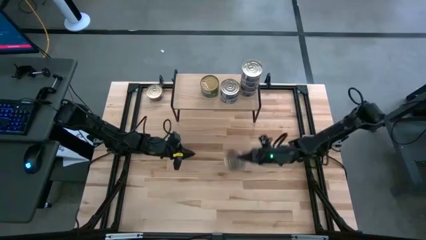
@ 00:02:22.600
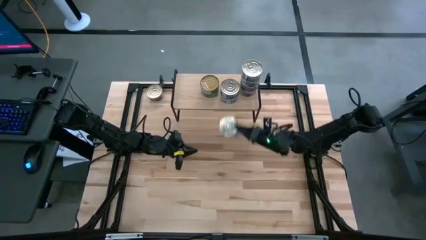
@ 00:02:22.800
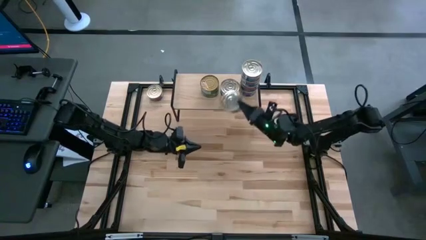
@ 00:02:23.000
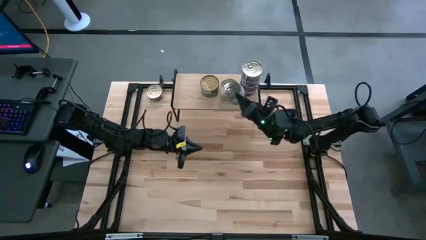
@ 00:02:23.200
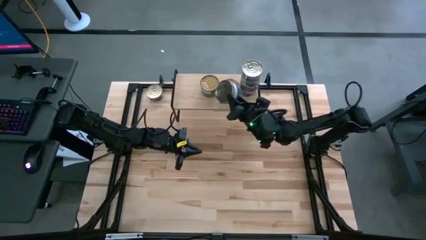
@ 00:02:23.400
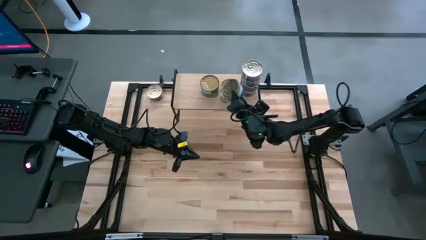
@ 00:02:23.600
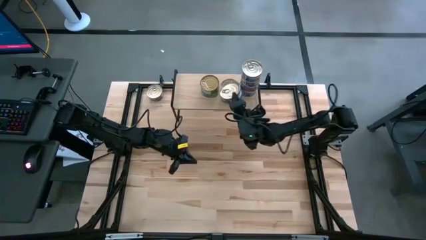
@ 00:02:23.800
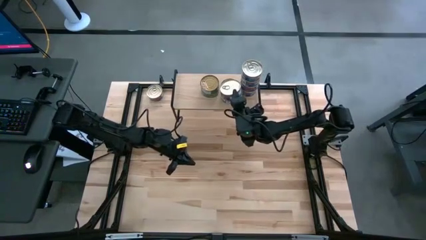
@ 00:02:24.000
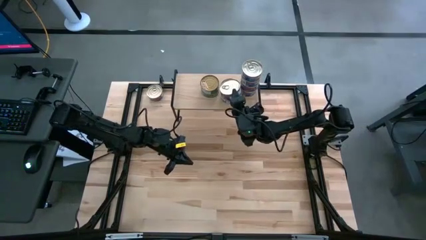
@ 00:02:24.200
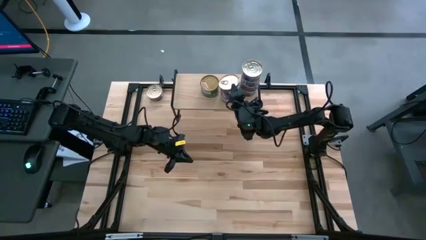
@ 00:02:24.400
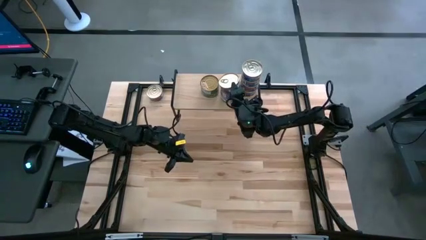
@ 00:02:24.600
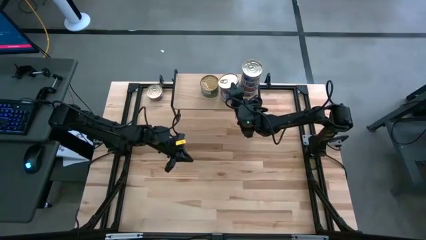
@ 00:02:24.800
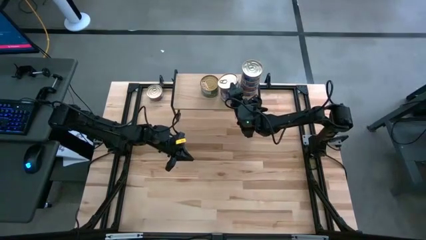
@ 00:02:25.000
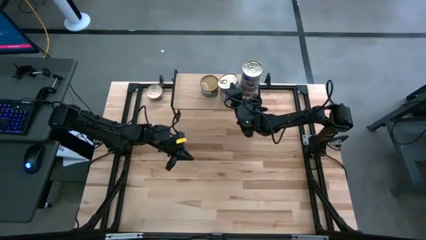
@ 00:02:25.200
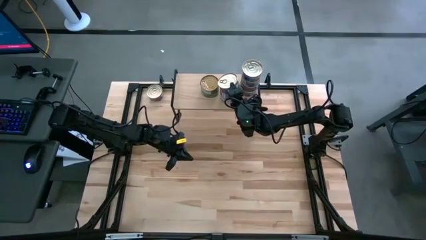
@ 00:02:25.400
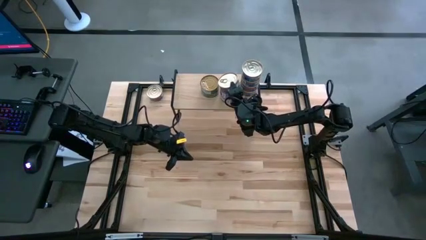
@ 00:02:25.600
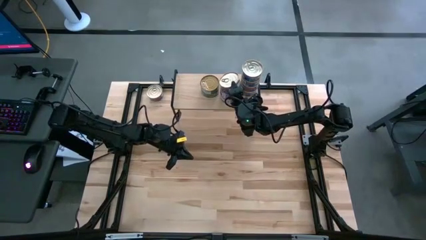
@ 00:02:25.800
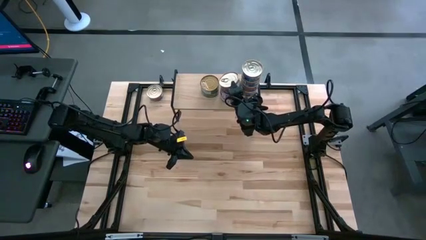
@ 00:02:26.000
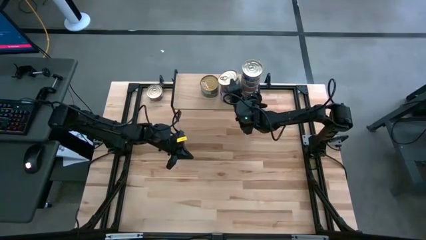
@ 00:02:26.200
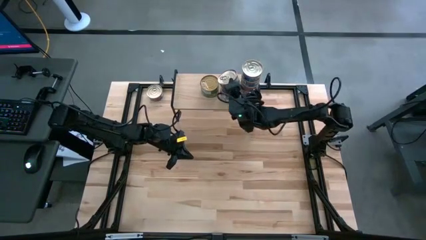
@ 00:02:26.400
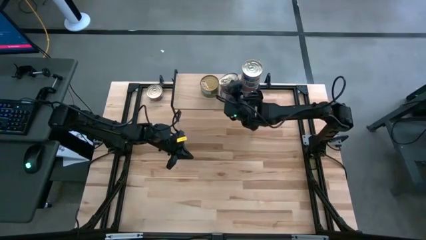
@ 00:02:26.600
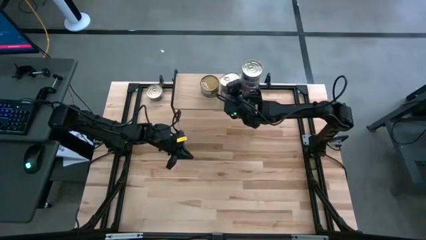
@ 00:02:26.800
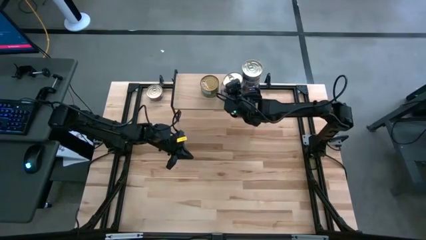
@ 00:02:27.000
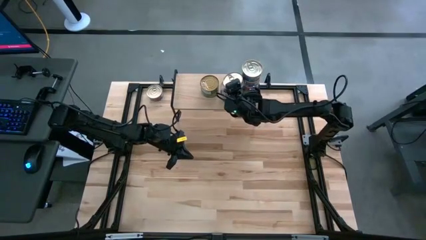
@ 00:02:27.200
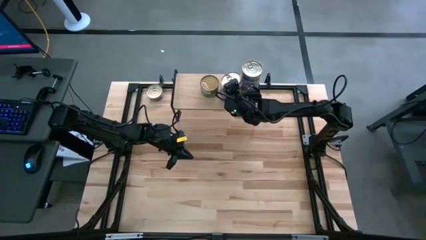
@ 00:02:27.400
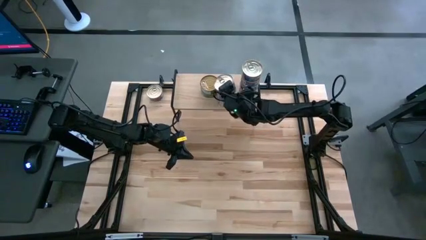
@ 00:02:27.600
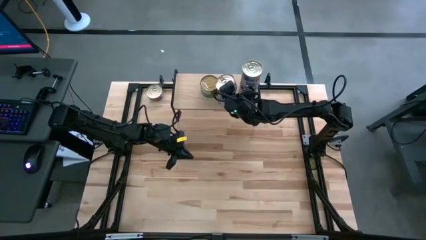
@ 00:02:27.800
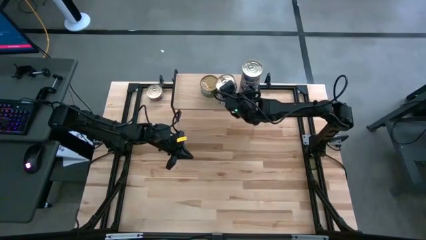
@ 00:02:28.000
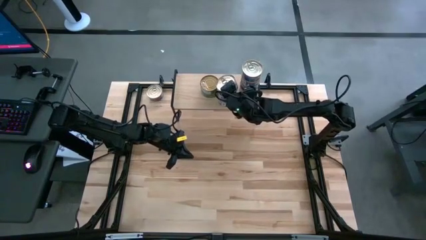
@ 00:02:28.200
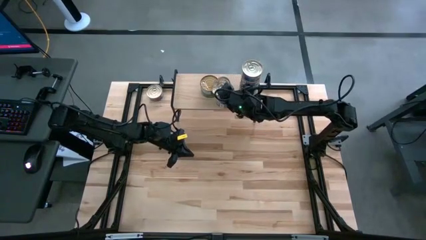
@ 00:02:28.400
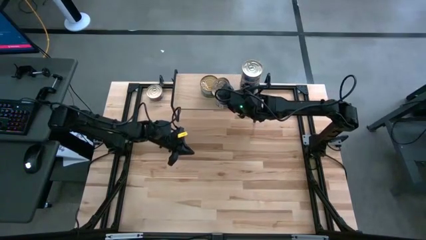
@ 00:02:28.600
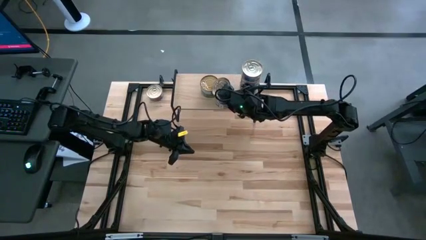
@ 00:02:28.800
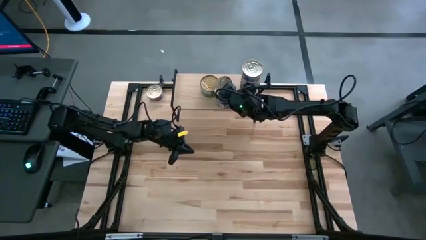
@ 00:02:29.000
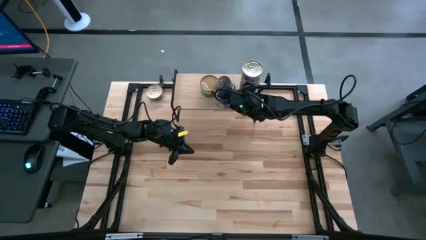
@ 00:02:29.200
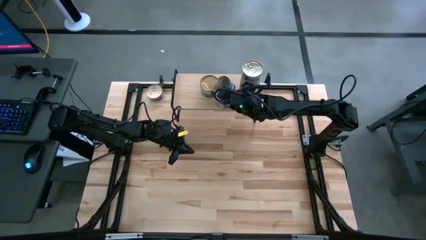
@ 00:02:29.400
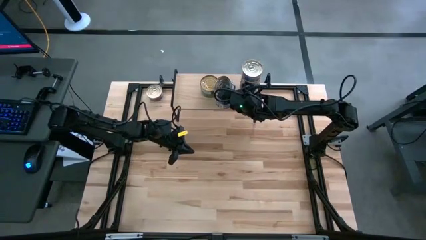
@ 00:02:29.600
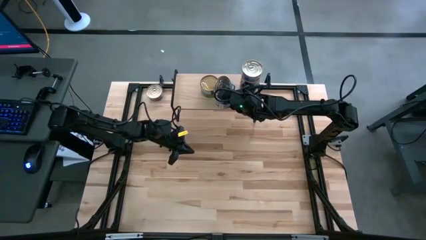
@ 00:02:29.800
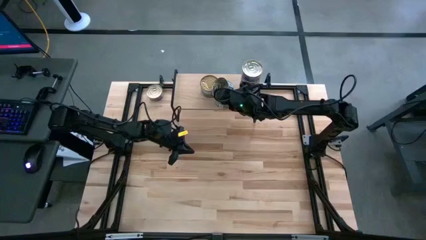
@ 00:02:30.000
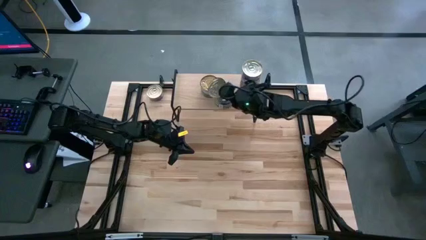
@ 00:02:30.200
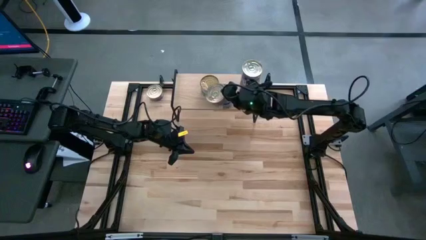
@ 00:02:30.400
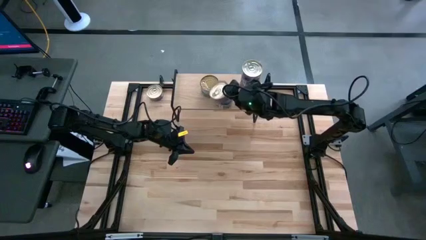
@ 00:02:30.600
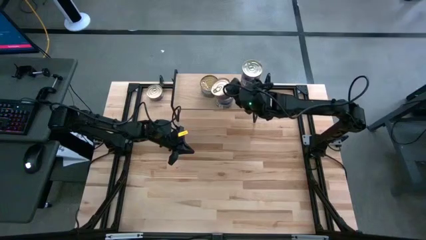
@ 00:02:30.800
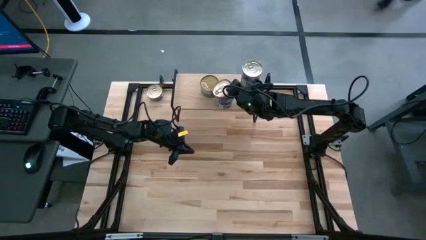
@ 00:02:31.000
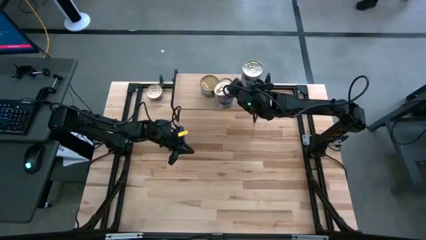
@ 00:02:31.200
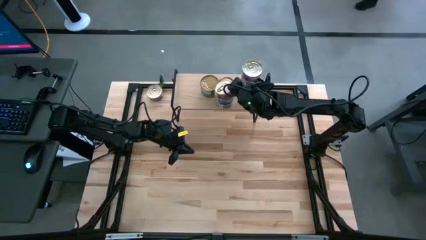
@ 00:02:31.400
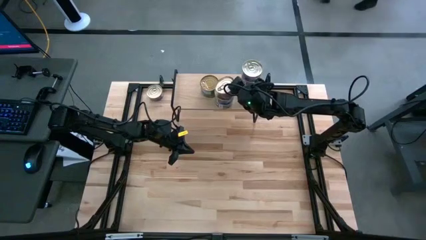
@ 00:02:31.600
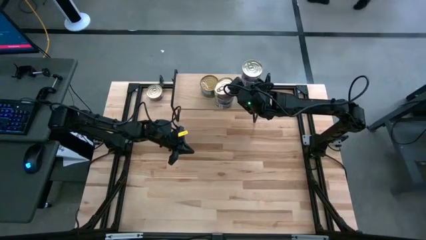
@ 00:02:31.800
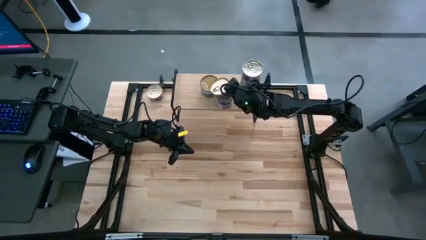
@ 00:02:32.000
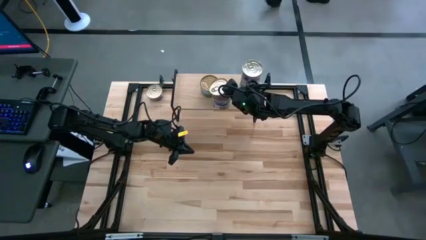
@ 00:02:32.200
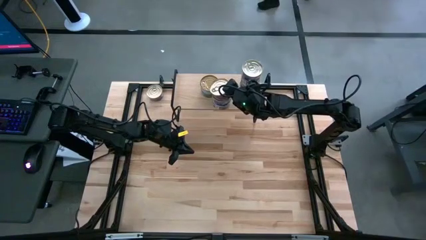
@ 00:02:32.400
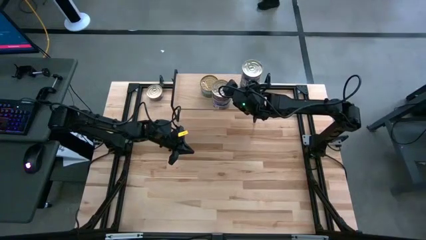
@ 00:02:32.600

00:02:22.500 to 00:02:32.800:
Task: Stack canned seafood by type on shelf
Stack the blue tuna can on top of the other stacked blue tuna cans on the shelf

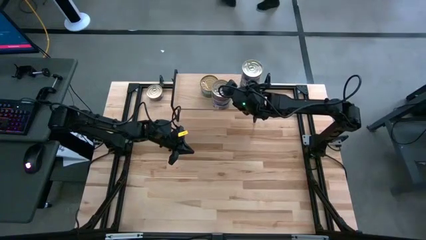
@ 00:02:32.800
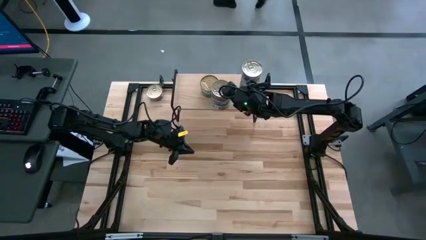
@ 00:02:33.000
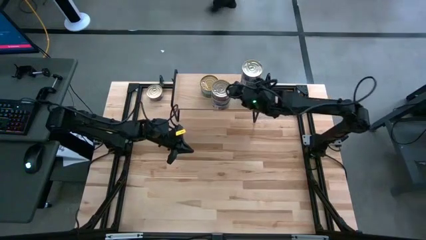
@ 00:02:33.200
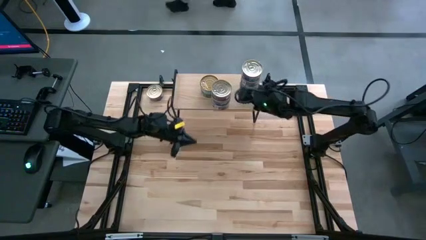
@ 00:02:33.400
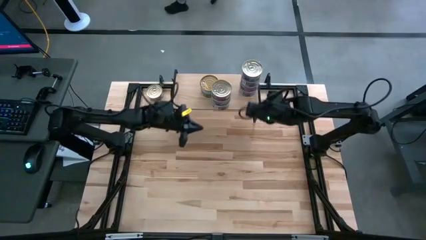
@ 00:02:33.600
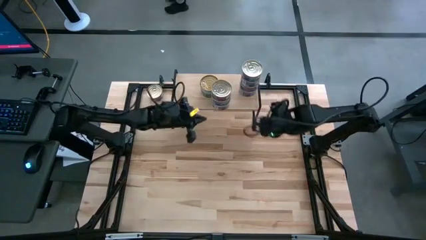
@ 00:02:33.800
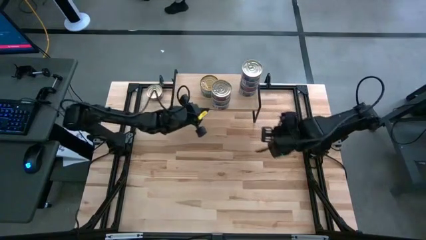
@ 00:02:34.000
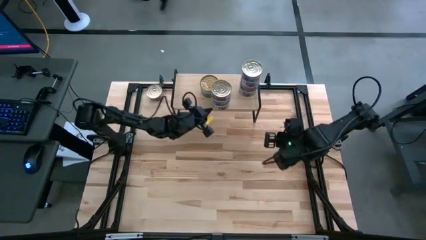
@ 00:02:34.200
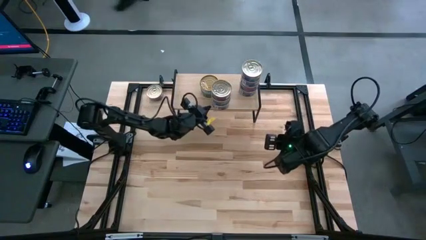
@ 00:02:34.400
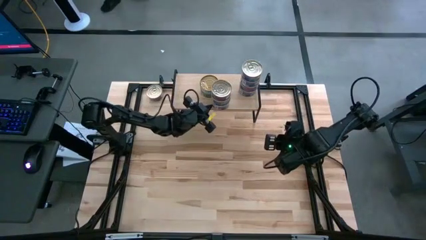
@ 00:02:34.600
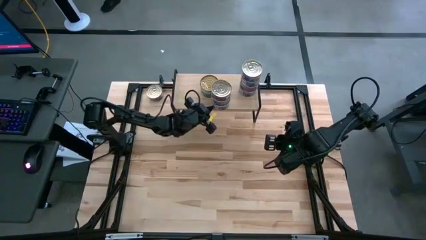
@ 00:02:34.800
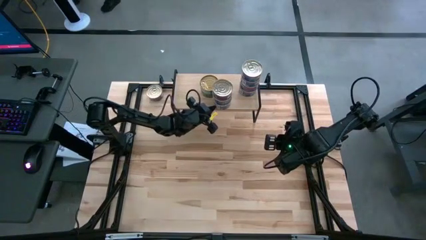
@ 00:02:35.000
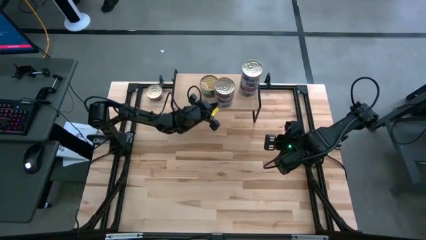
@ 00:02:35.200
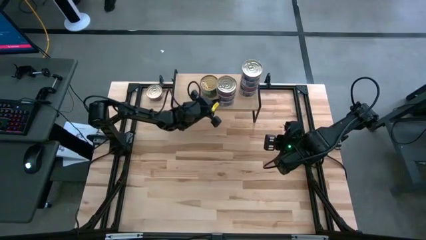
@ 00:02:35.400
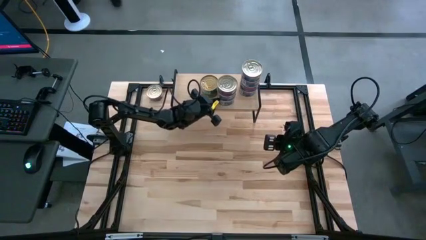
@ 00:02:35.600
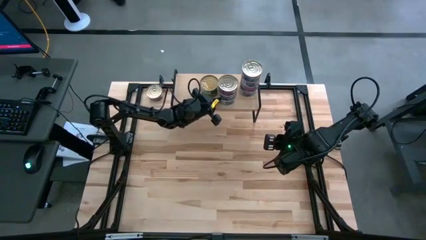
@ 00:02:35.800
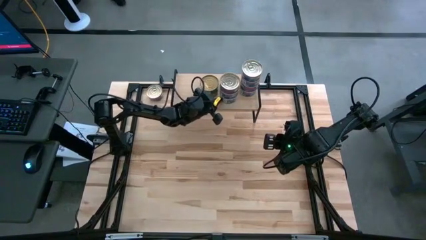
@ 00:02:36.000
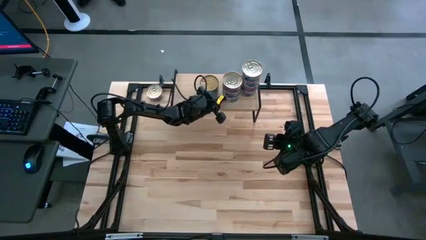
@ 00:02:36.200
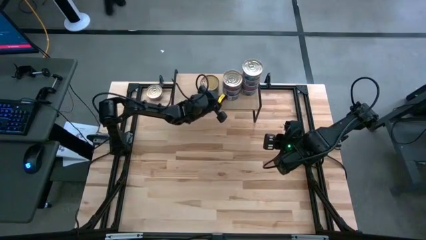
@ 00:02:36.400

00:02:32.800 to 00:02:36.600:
Adjust the left stacked blue tuna cans on the shelf
